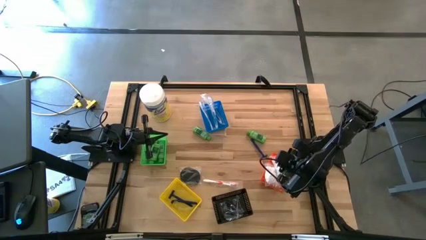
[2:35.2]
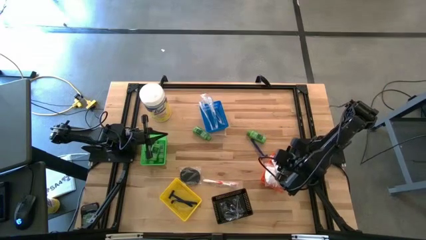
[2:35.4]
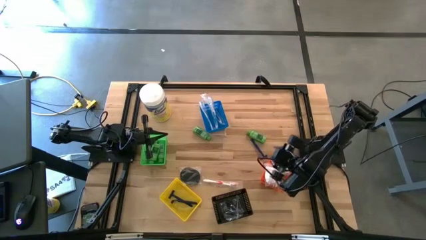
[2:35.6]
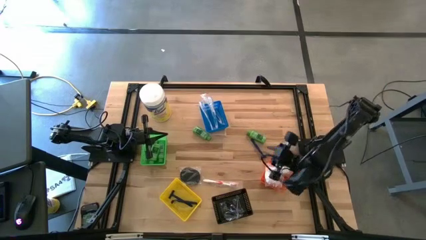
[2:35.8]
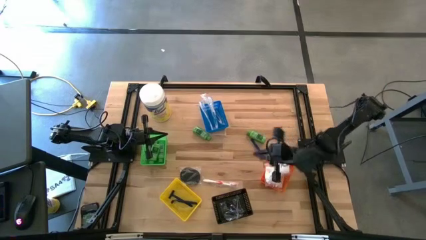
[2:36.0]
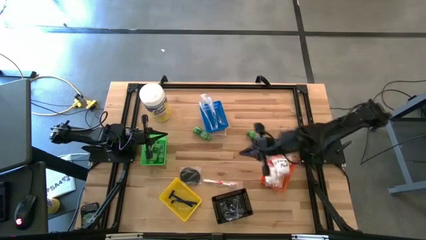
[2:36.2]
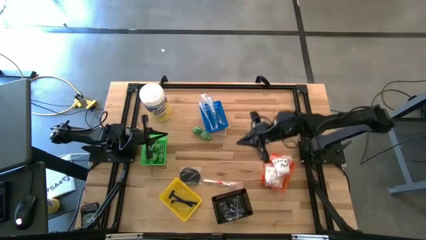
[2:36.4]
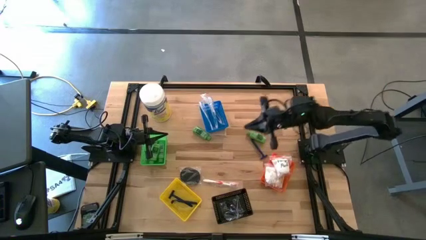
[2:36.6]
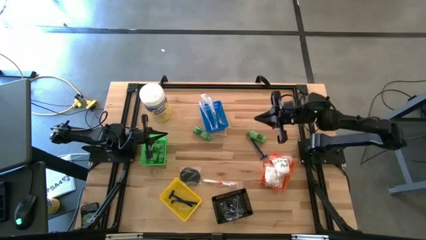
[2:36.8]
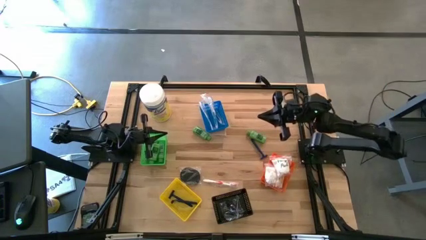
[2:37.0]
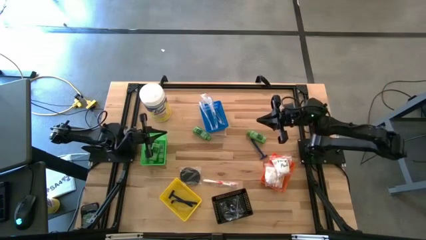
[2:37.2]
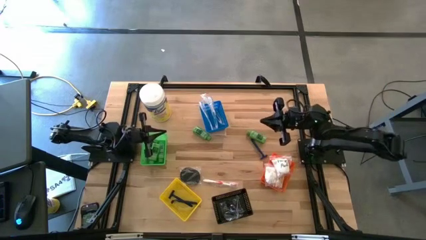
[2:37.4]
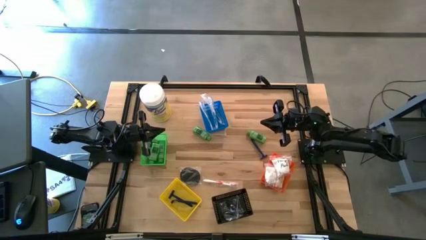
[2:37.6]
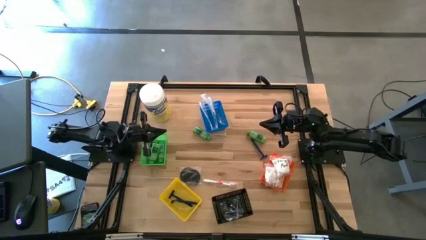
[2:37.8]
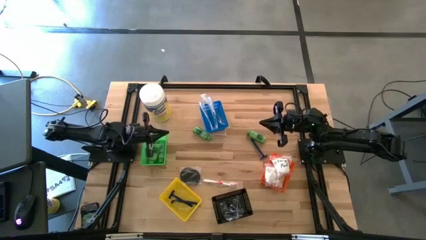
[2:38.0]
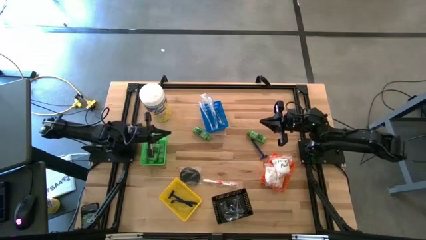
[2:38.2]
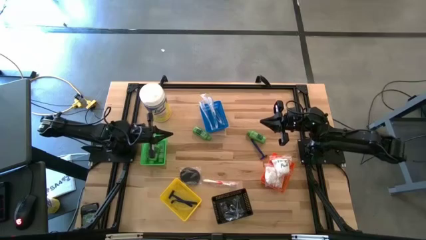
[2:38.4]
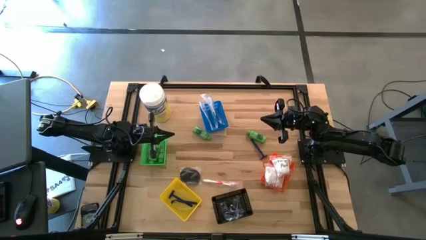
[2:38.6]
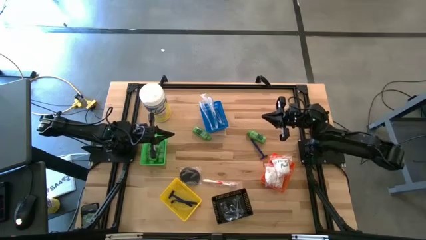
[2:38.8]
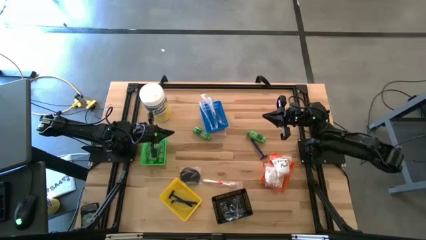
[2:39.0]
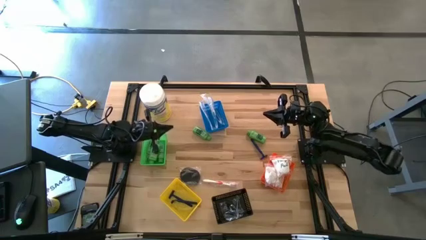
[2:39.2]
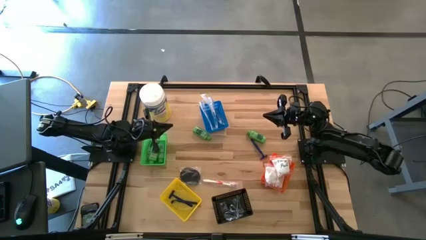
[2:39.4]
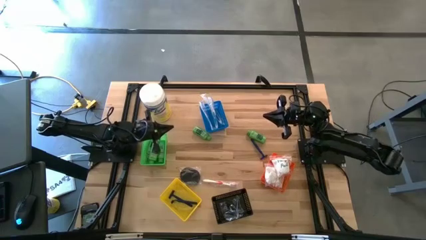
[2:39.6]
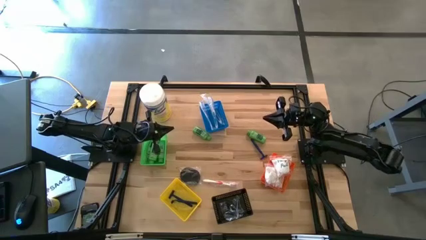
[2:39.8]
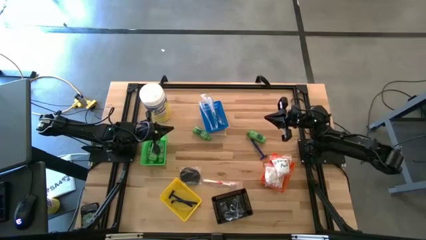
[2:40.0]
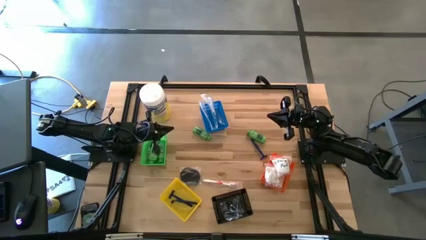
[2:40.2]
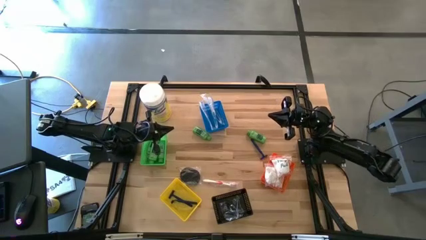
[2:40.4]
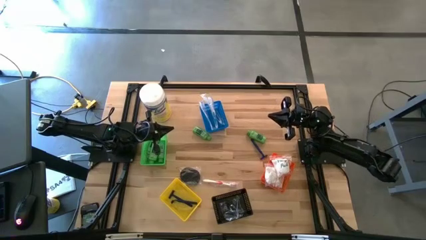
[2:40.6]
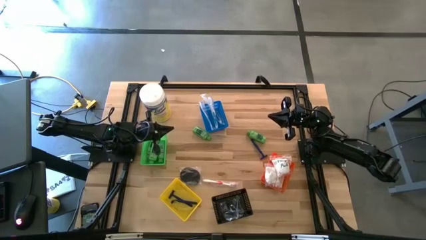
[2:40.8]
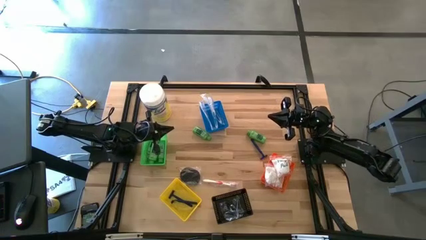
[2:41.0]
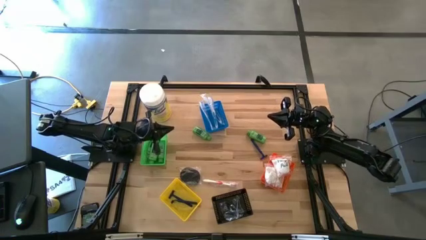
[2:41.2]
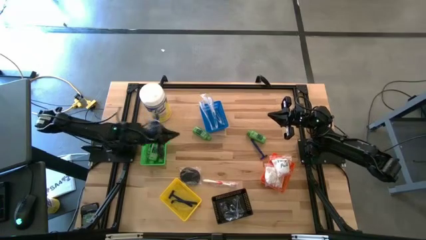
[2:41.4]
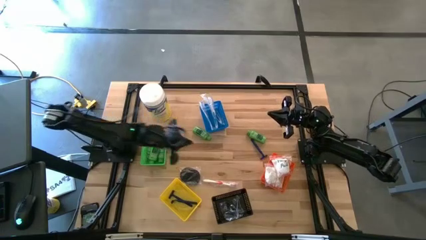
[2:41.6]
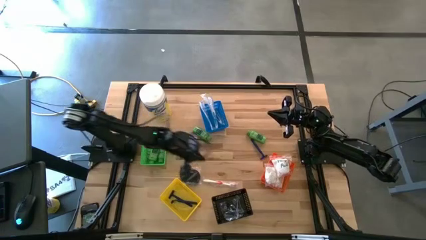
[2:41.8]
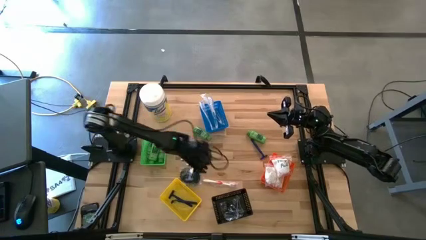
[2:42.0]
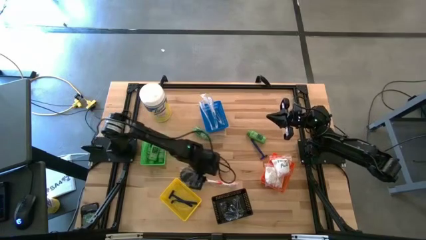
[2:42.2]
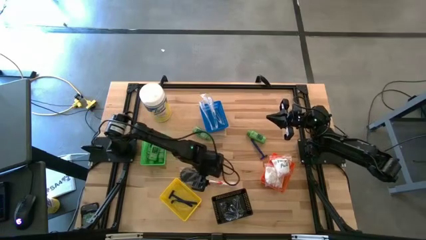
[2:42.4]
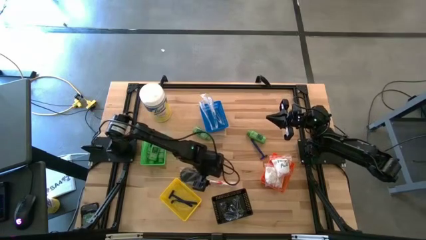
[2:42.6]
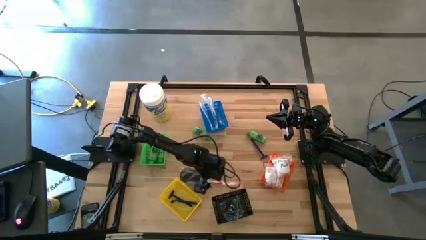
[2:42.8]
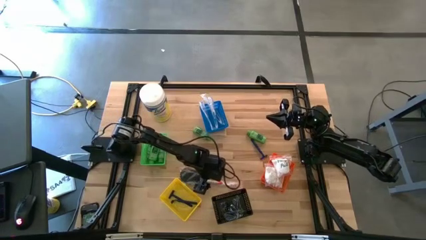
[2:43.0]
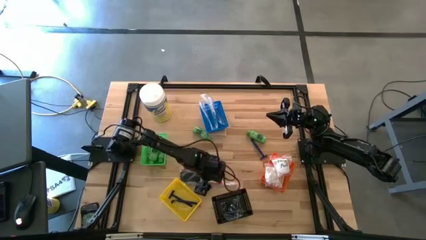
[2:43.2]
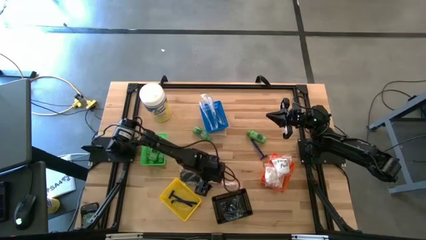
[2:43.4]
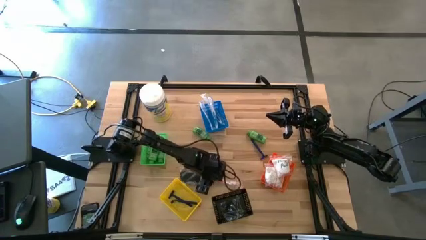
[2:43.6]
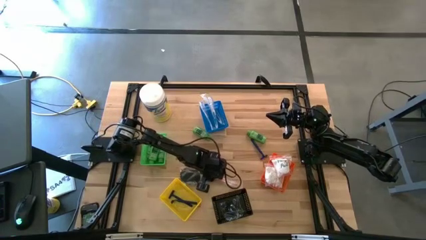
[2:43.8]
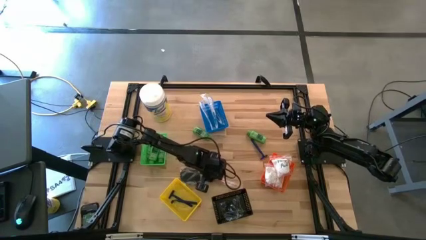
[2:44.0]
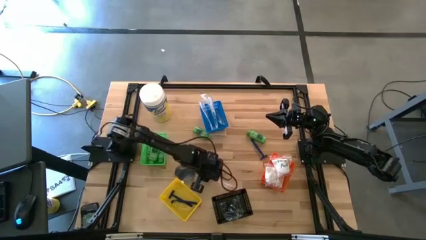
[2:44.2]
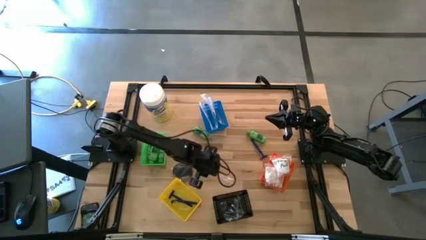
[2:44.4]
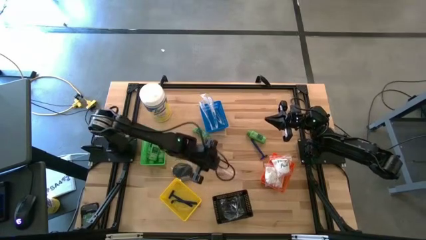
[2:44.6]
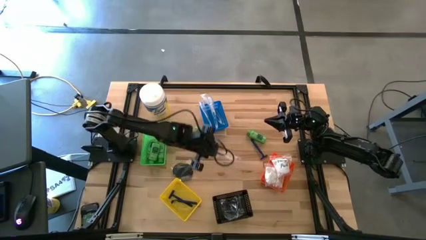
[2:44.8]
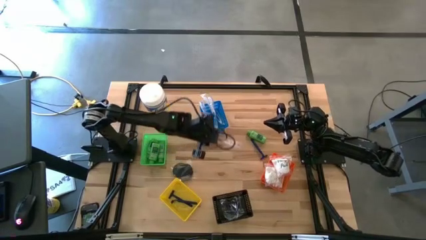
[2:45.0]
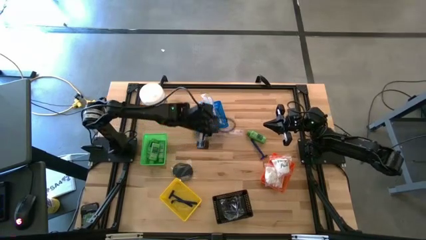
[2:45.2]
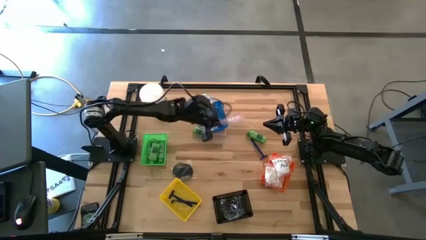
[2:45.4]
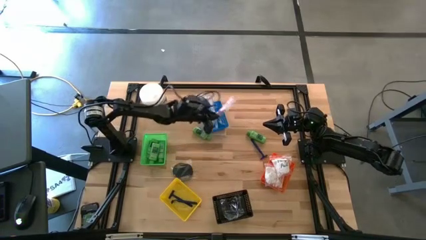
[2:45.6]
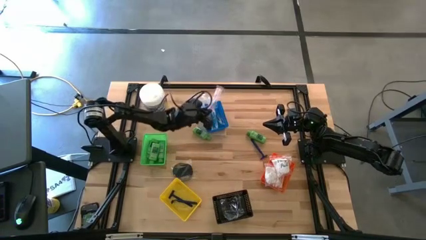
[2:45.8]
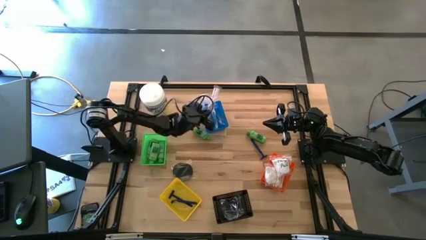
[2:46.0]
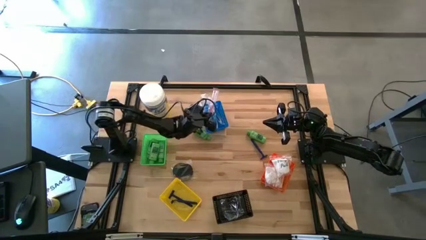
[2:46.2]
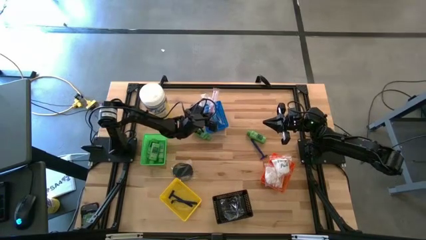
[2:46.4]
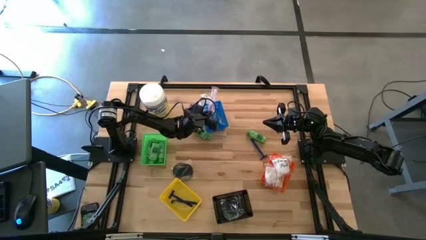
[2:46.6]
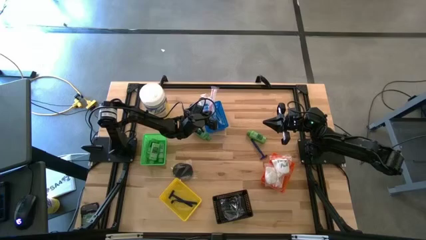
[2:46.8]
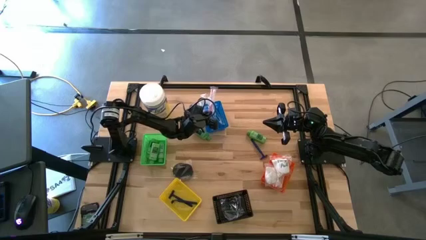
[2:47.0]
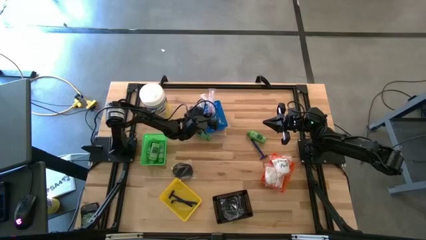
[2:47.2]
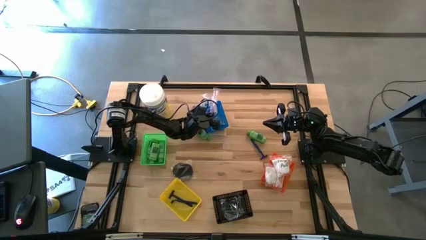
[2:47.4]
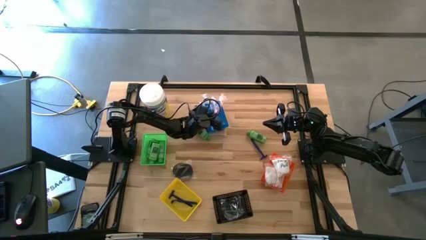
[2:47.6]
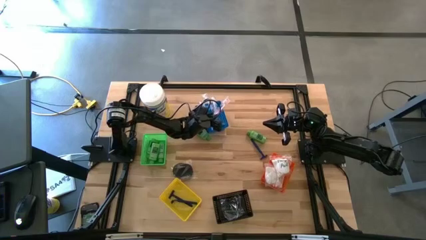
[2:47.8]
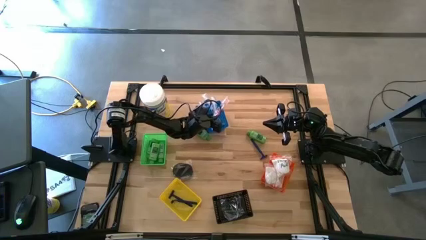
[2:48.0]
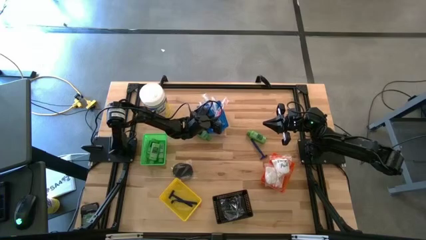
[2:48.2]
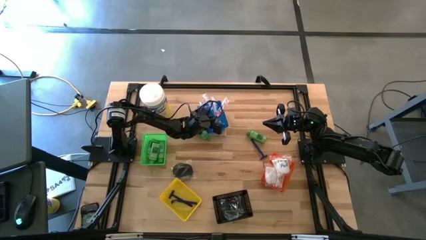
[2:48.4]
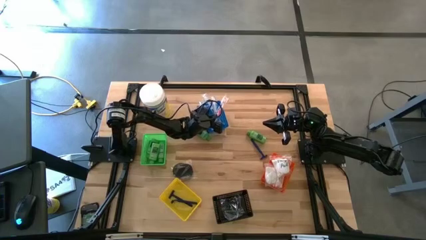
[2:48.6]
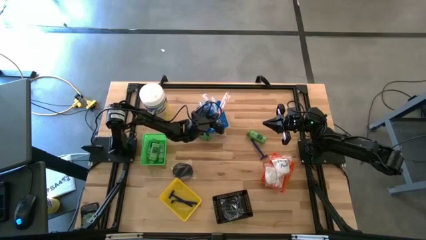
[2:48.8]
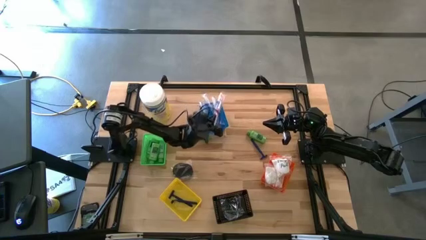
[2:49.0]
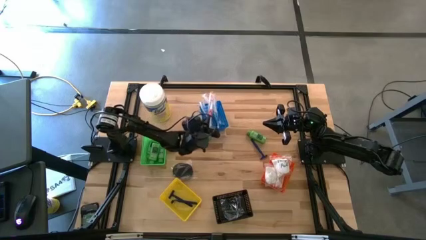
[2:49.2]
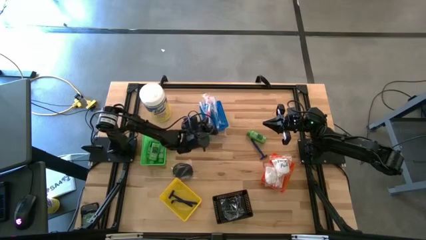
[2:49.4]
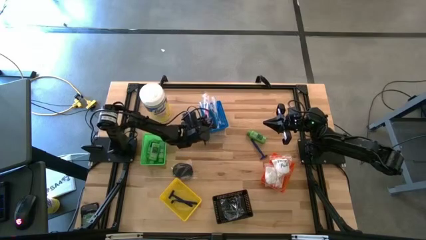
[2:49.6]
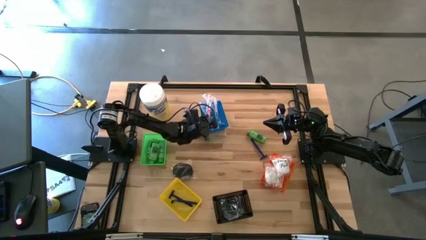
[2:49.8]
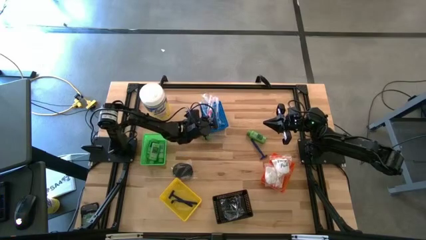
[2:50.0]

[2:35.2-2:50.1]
Task: Pick & Place Travel size toiletries
Put the red toothbrush into the blue bin

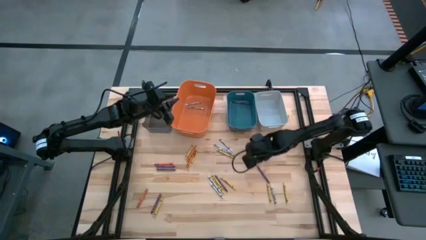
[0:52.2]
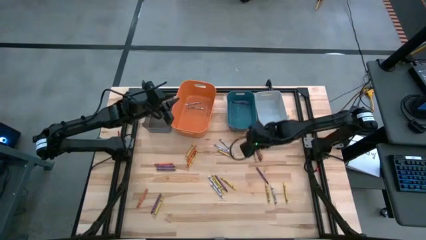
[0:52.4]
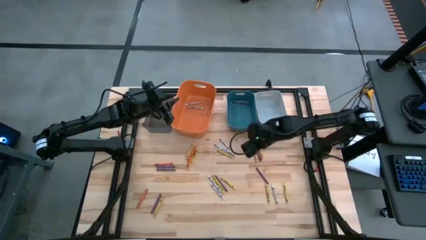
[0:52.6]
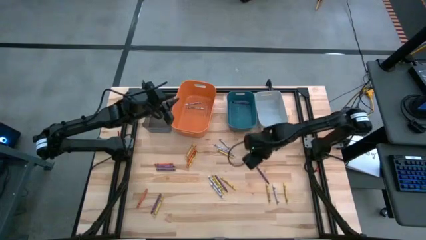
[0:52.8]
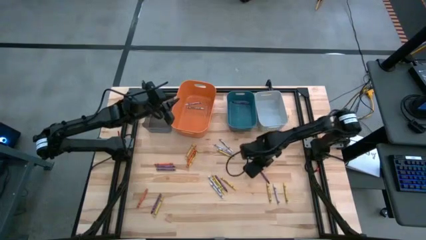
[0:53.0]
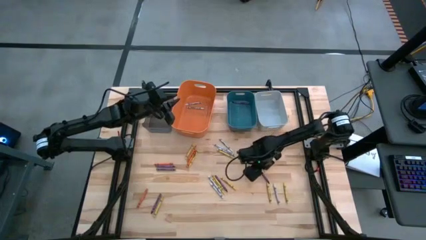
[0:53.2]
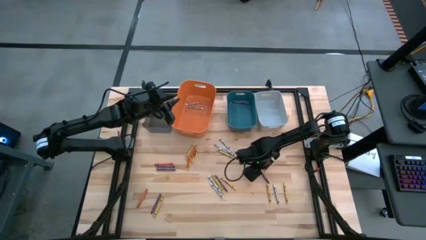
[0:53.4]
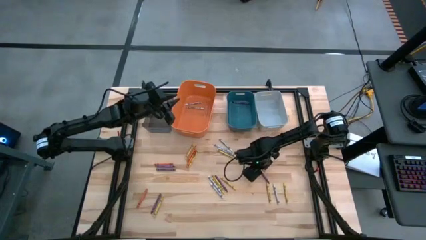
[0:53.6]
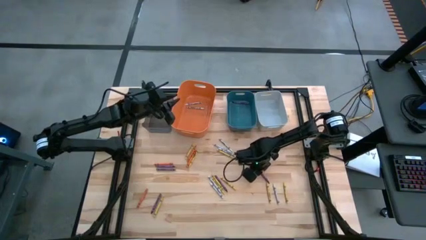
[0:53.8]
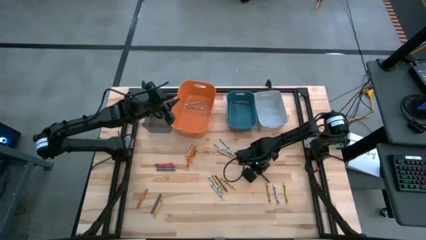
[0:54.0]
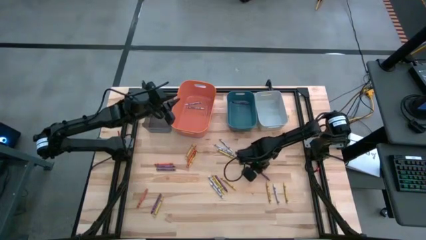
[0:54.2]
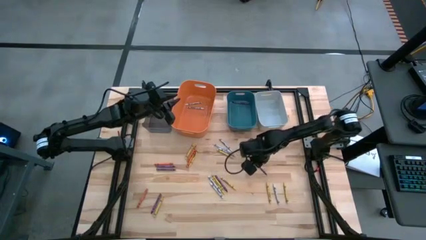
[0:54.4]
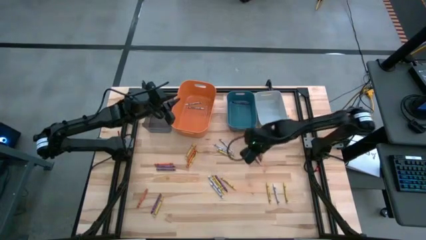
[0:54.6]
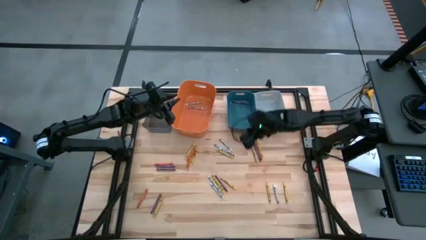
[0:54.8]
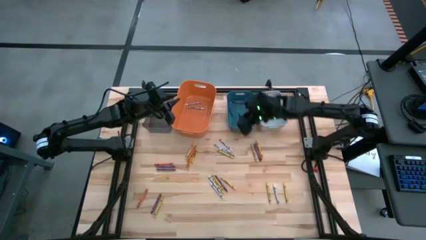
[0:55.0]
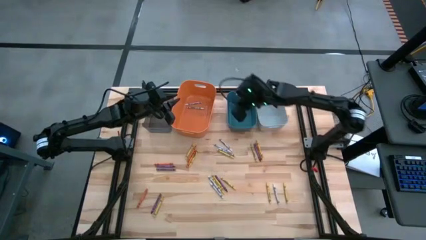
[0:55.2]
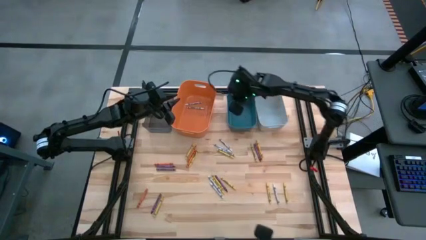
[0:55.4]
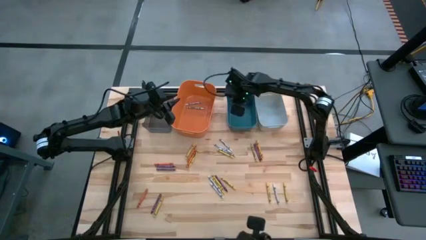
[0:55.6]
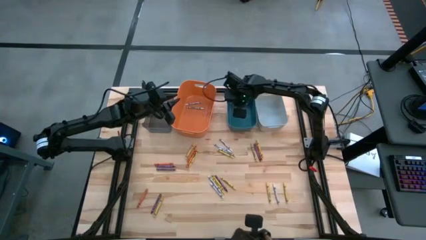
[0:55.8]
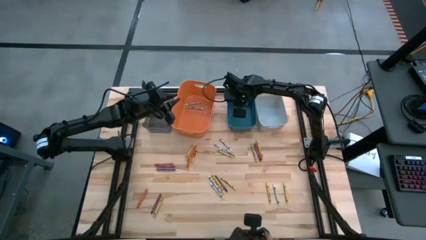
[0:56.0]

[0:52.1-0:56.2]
Task: Sort crayons
Put the purple crayon into the blue bin
